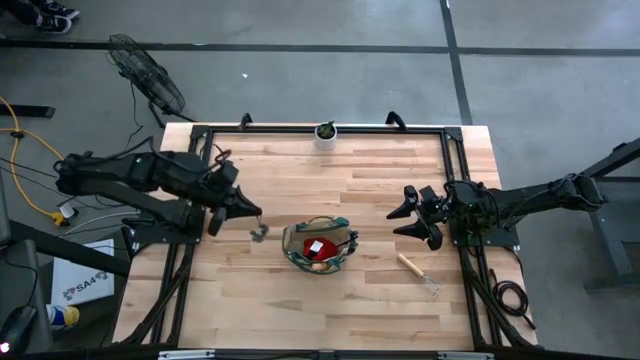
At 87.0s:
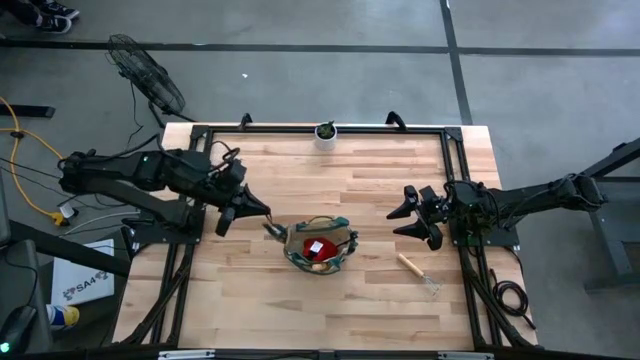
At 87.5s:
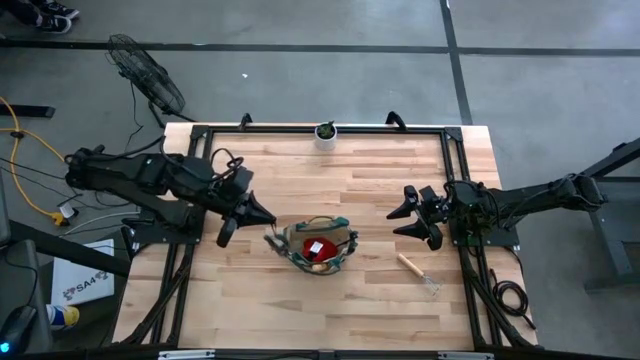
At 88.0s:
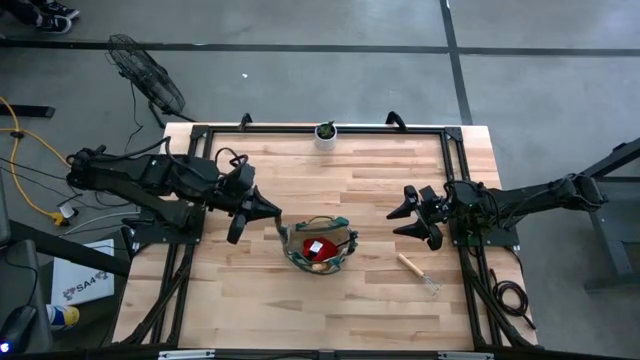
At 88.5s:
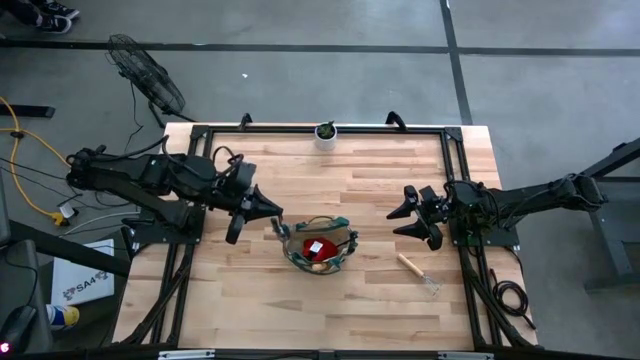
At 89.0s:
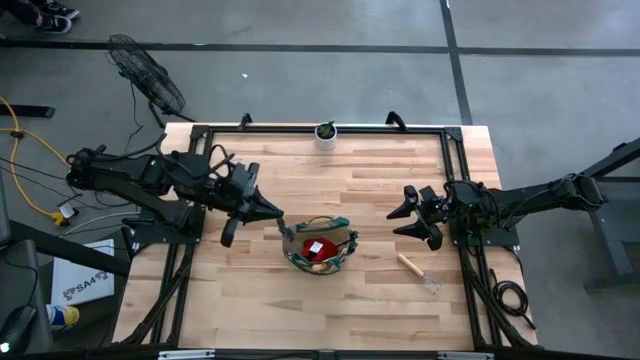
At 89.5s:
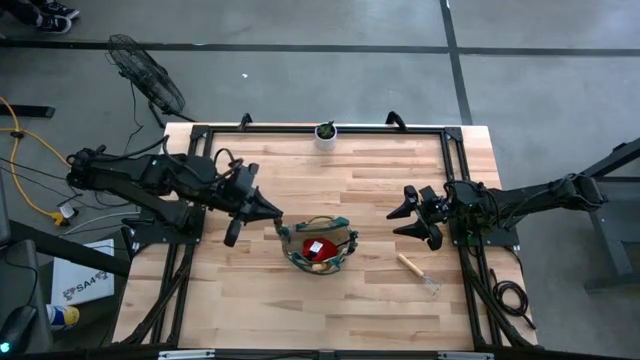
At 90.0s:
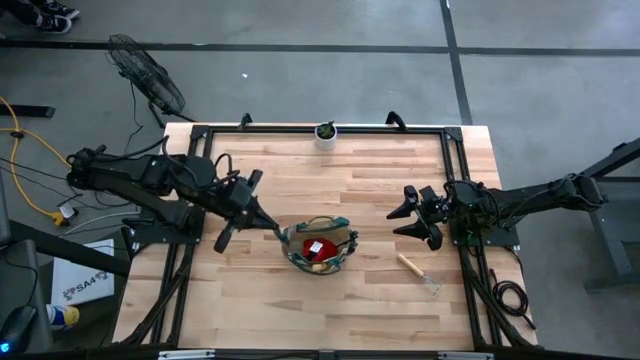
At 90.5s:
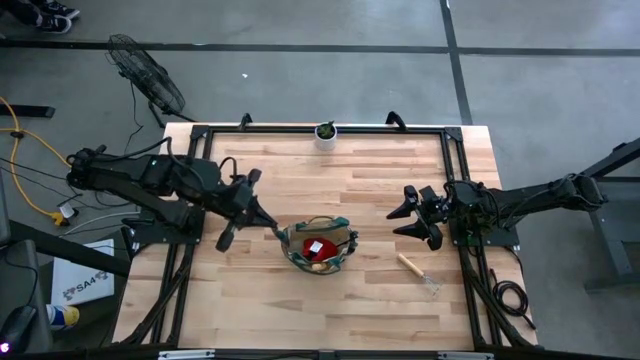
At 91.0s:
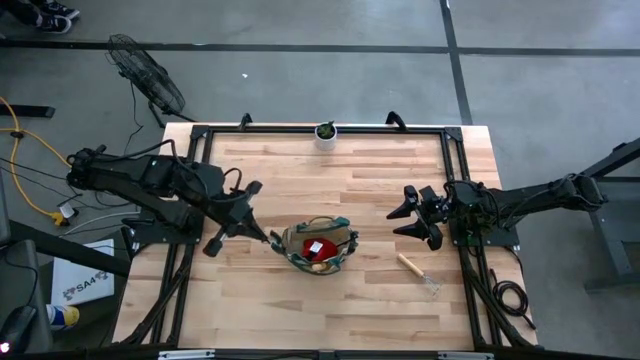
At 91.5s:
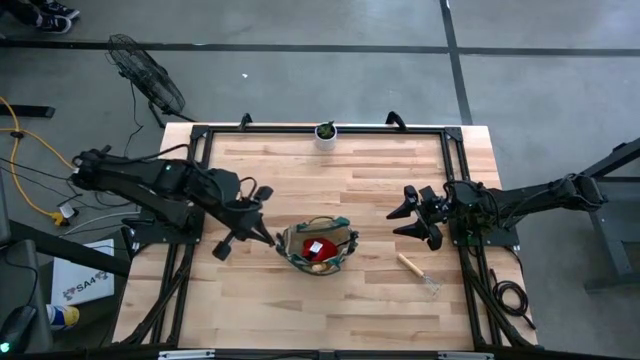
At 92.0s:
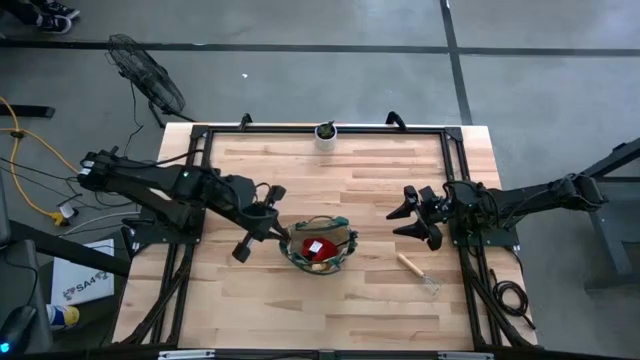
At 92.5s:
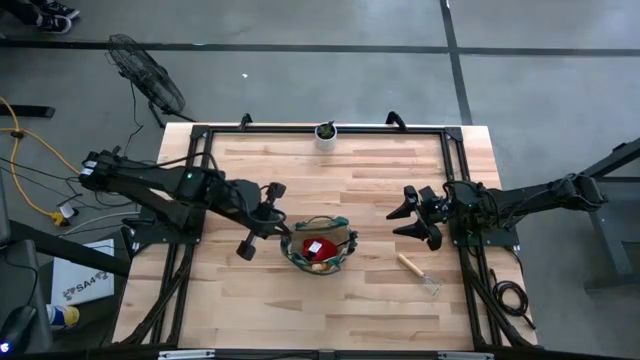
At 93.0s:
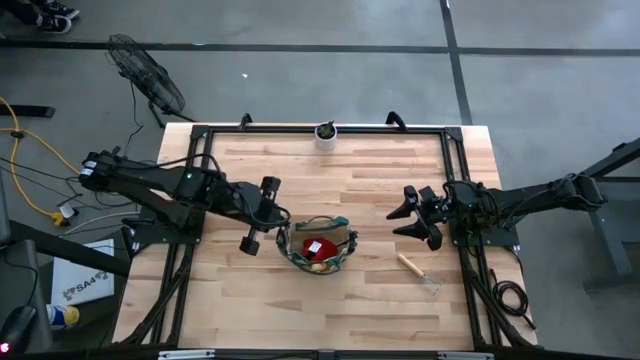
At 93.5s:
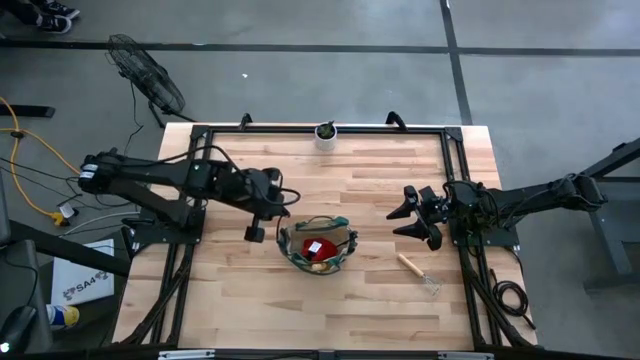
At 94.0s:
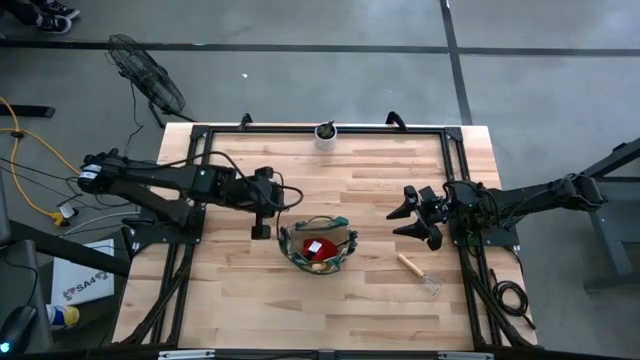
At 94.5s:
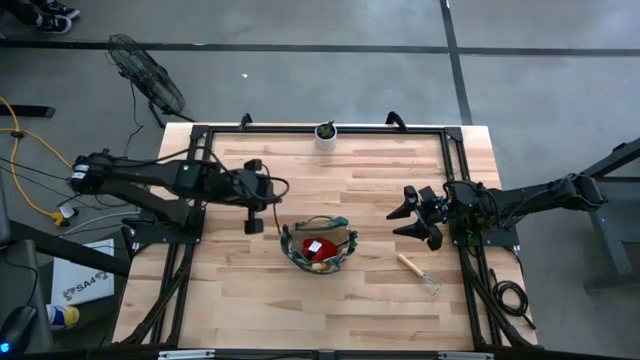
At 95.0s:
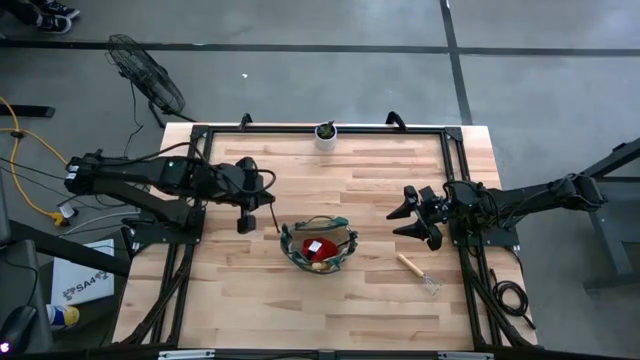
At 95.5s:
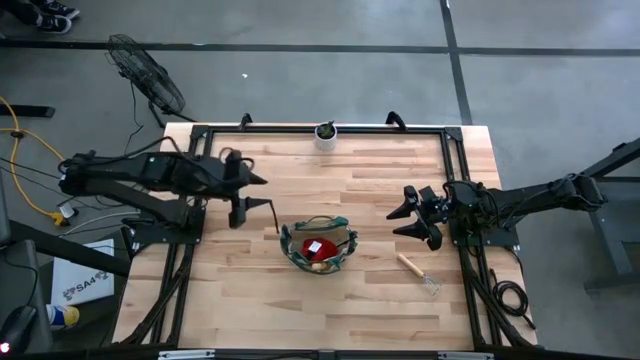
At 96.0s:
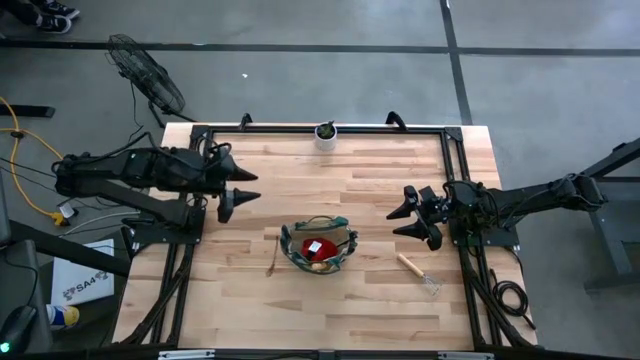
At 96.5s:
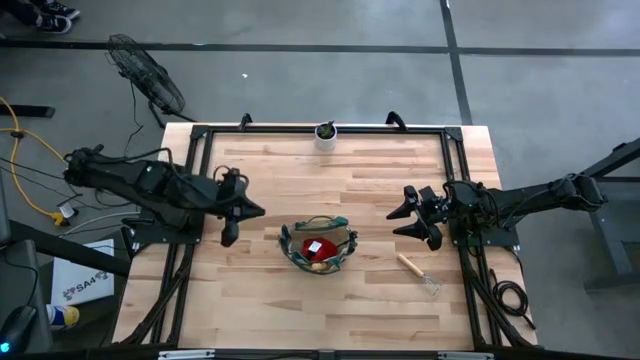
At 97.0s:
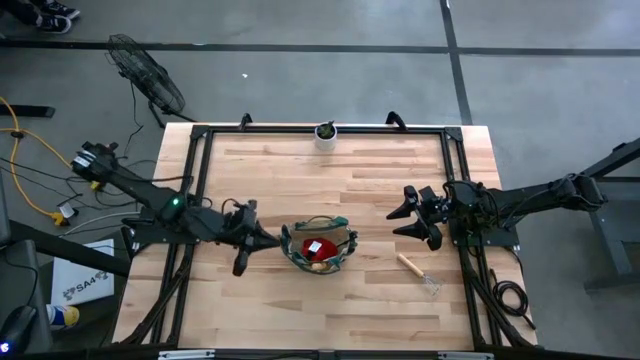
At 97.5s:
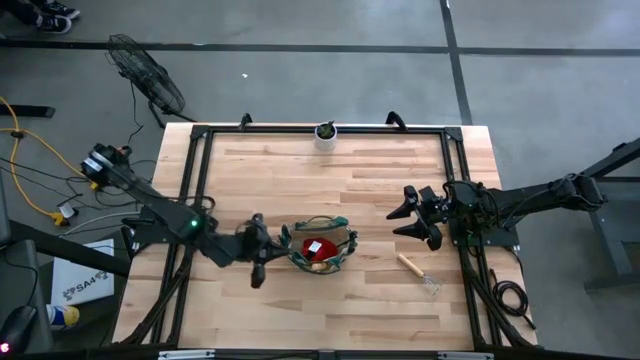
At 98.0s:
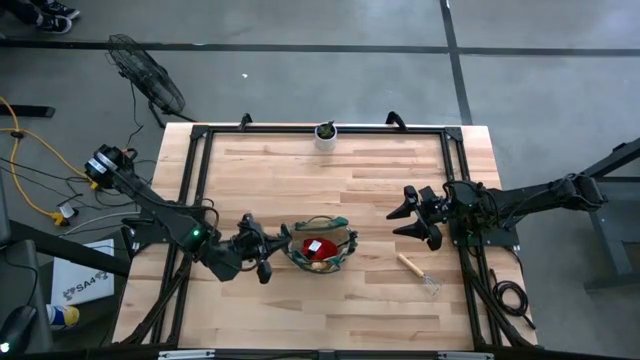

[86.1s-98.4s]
Task: Pick & Place Garden tools in Gardening bag
Put the green shear scissors into the gardening bag

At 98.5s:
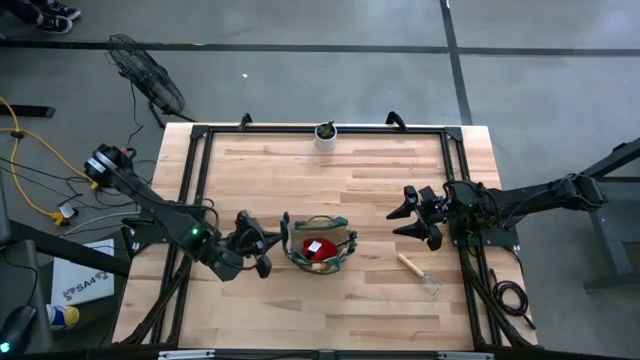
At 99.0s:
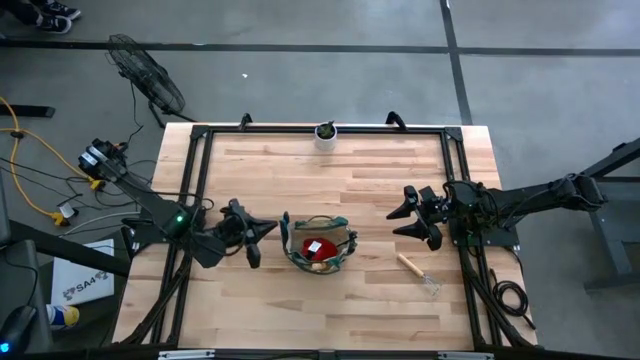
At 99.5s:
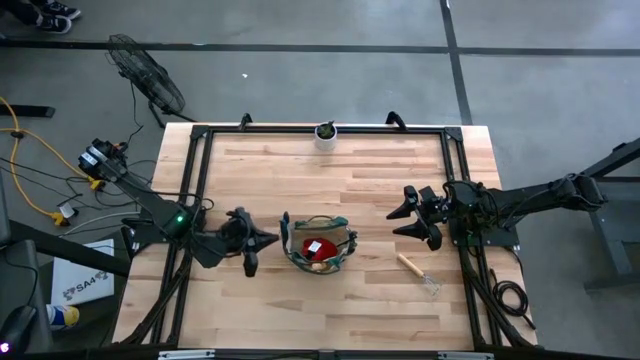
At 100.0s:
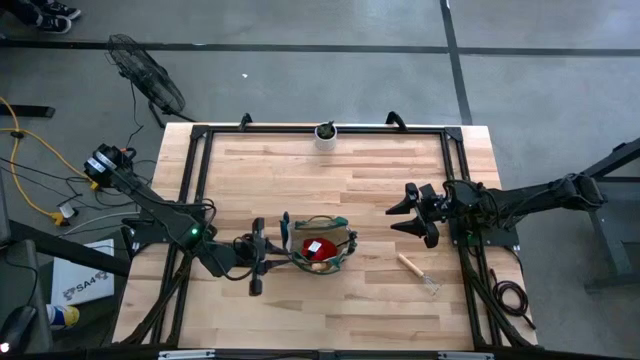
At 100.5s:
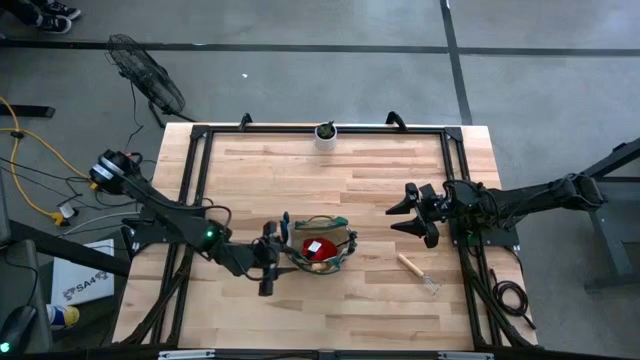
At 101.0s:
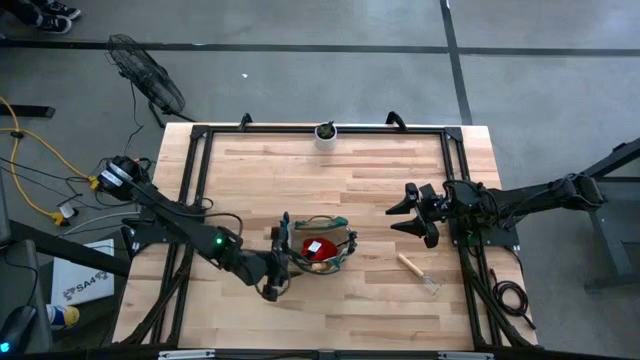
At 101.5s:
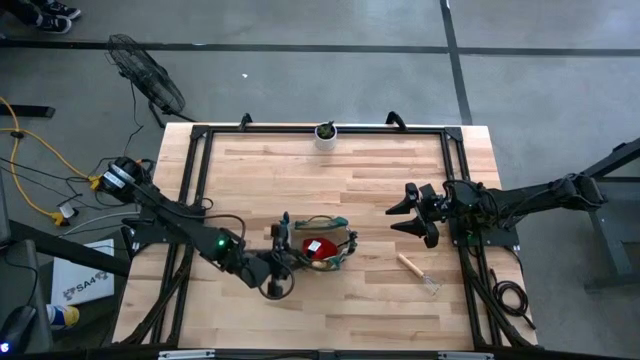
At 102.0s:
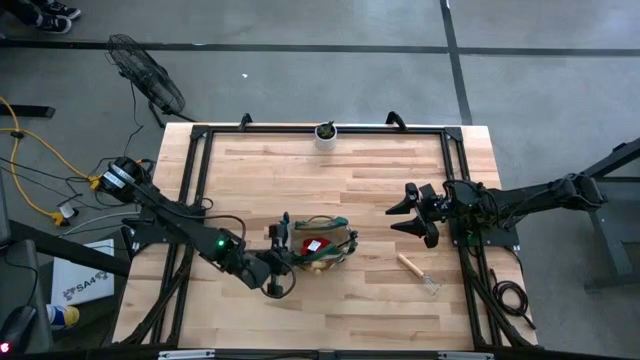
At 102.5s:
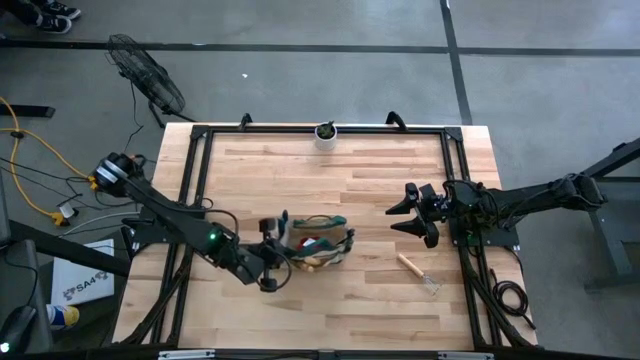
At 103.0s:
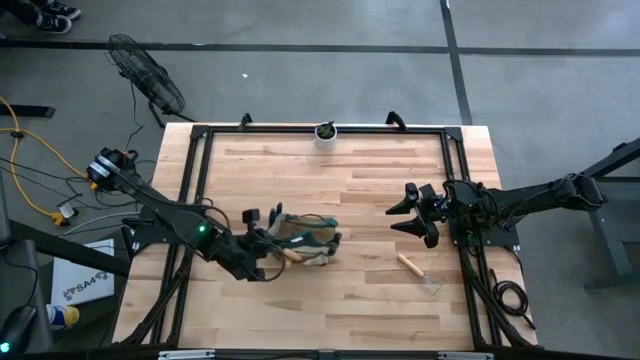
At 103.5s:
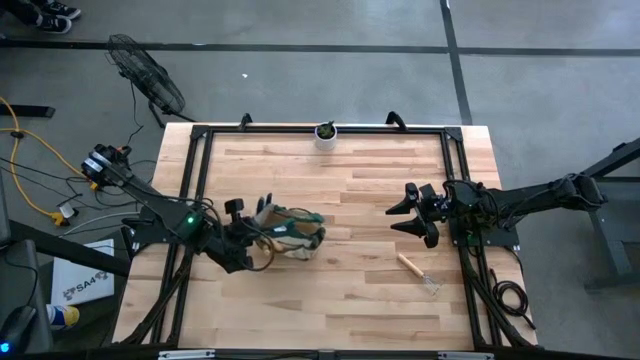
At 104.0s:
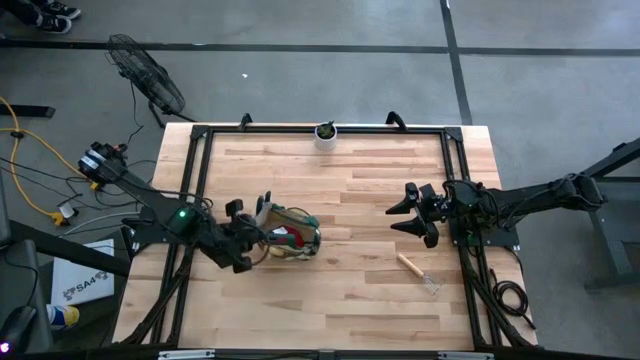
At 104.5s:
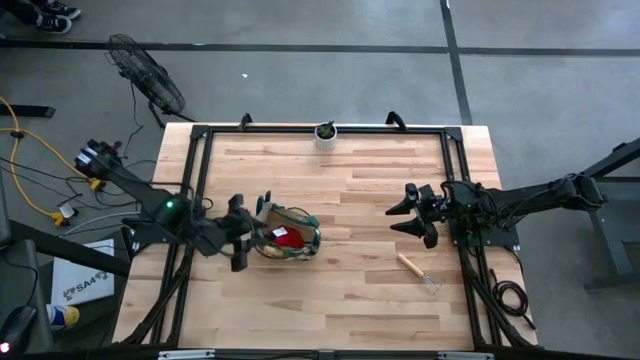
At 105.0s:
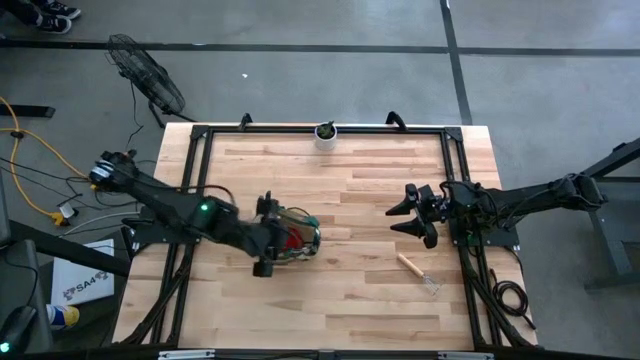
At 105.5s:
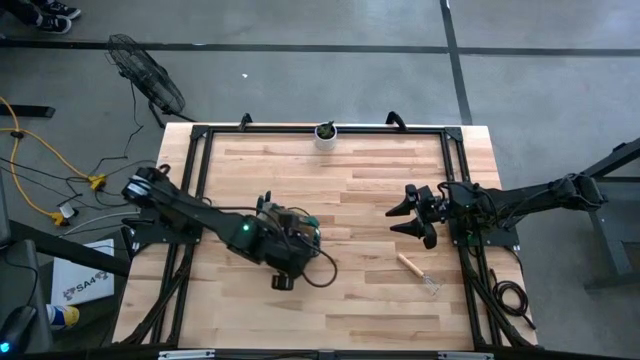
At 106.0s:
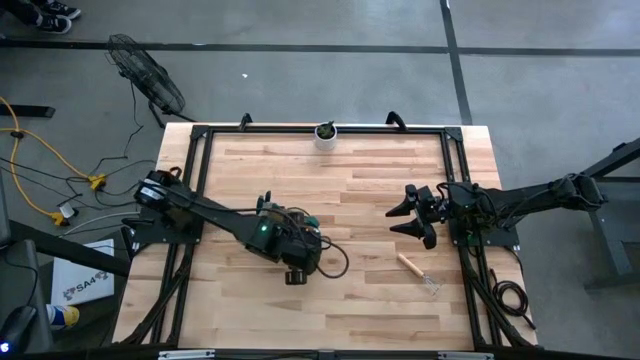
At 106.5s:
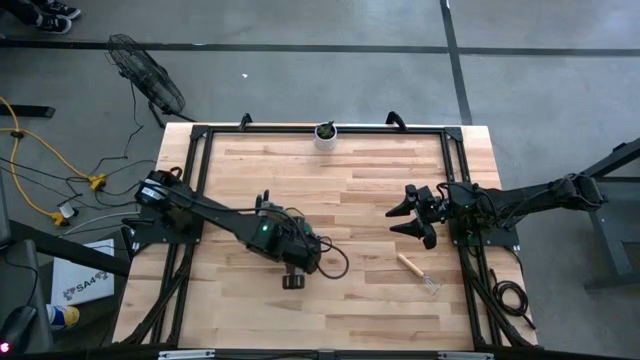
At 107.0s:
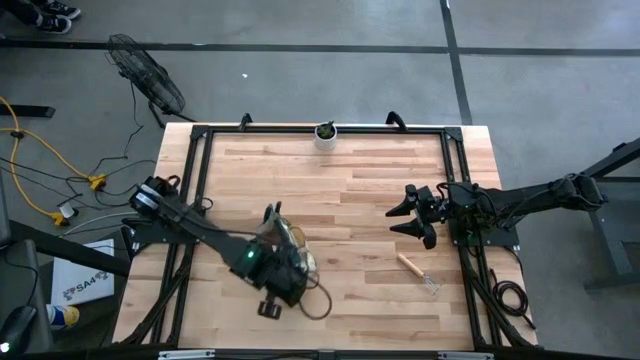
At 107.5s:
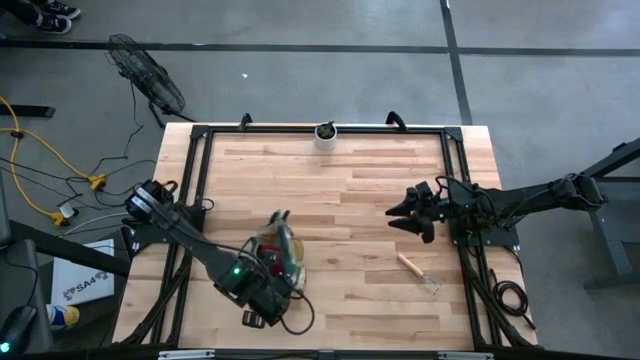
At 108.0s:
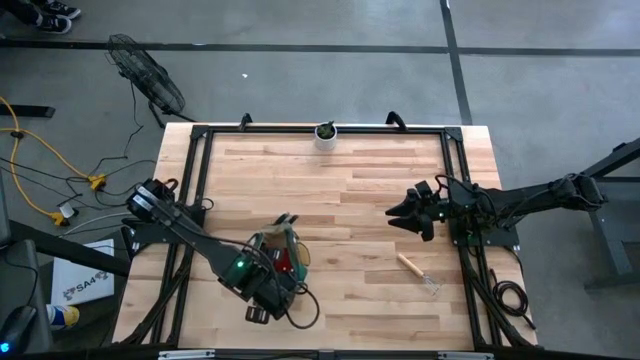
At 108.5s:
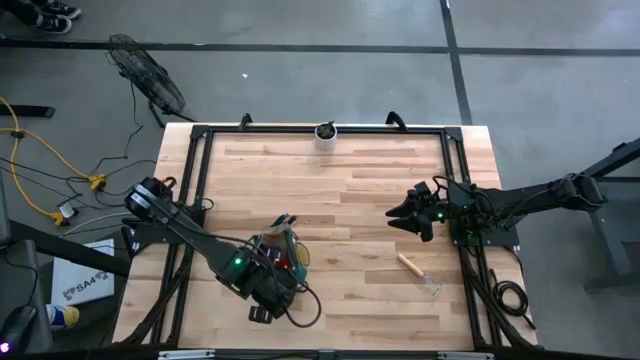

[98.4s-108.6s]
Adjust the gardening bag on the table
